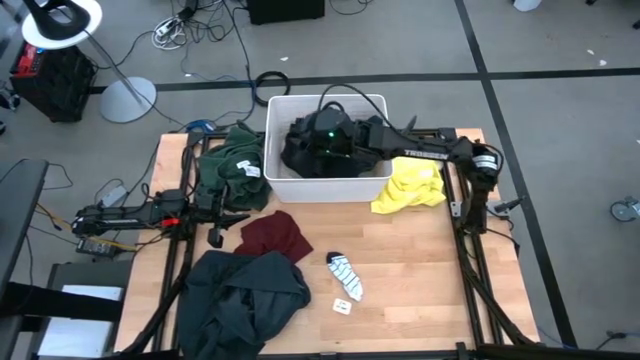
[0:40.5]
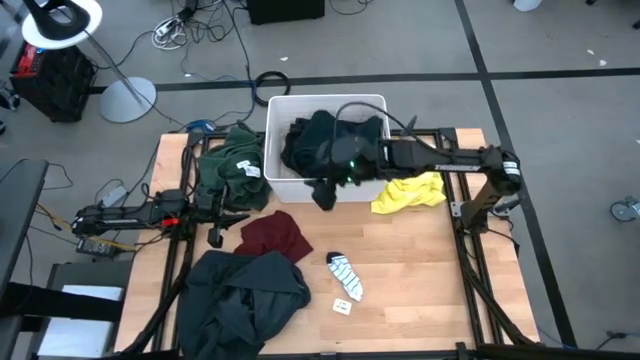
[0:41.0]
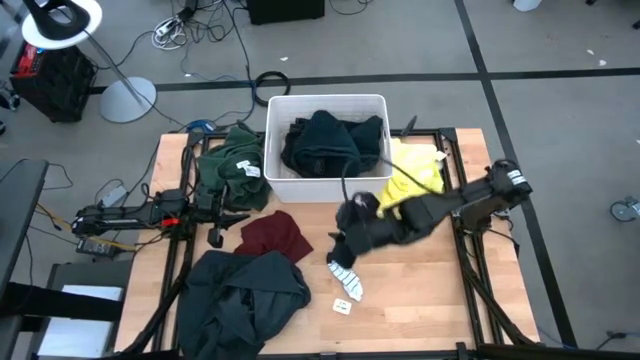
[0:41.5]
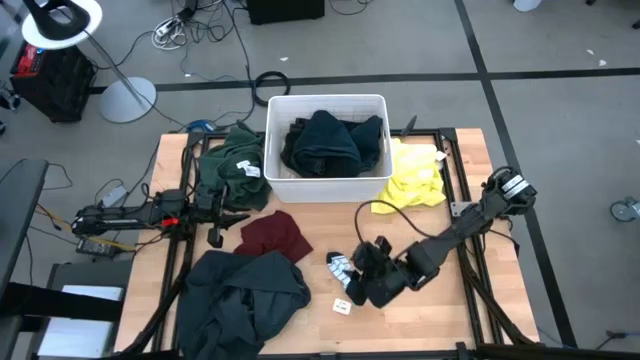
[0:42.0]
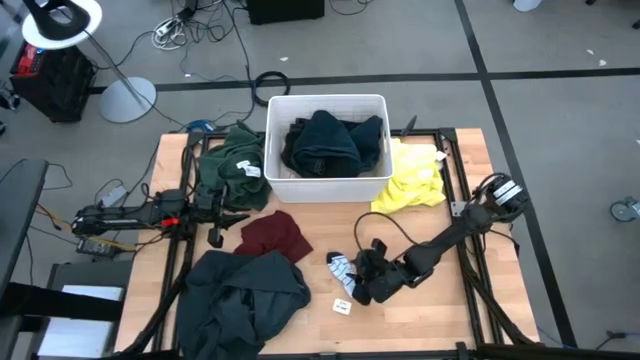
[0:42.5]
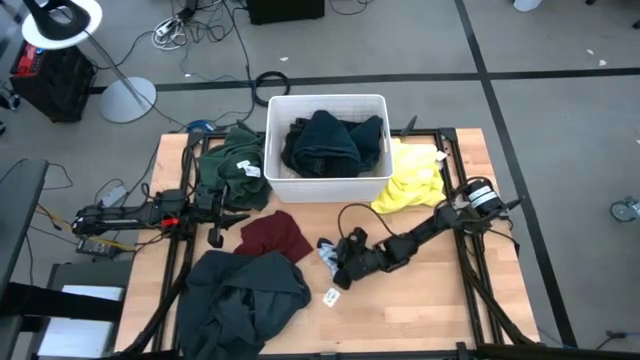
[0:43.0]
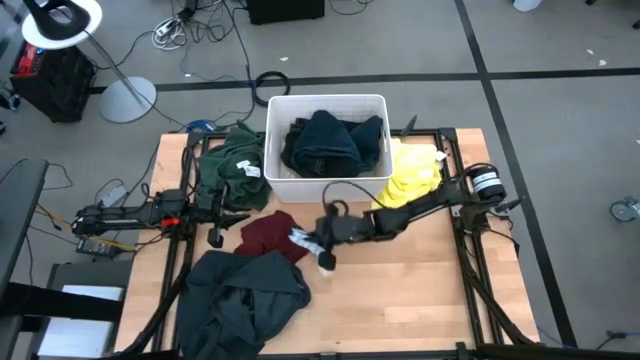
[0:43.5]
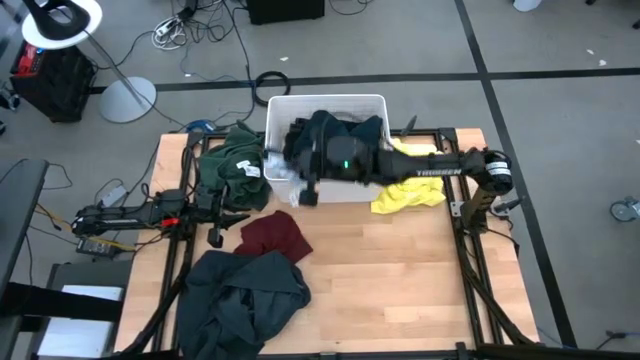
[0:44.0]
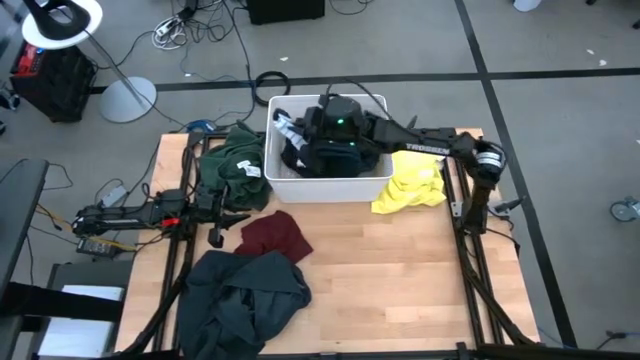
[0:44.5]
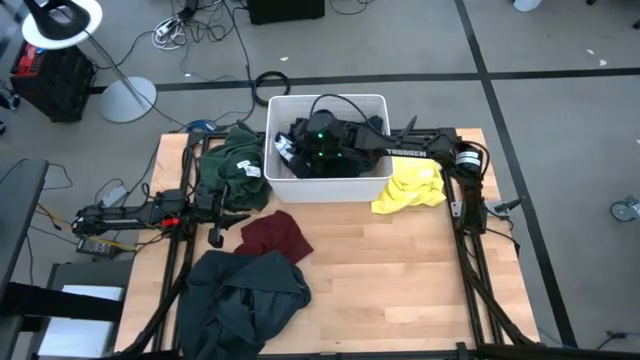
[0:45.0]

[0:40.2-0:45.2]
Task: Sort clothes
Put the white sock into the white bin

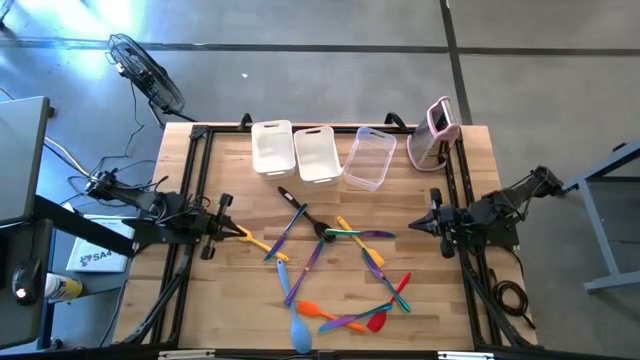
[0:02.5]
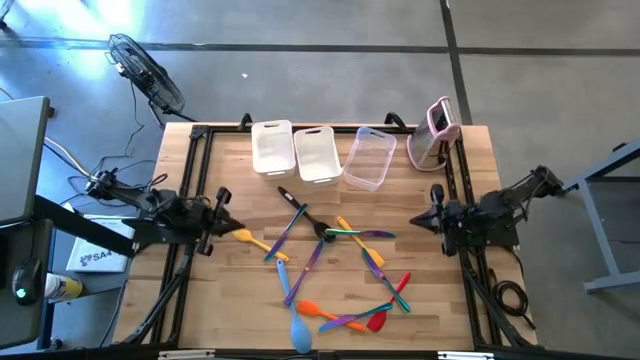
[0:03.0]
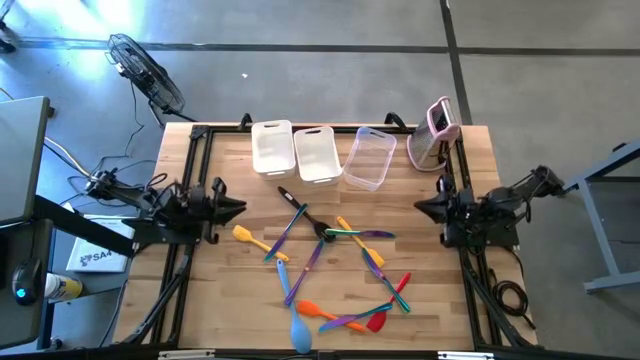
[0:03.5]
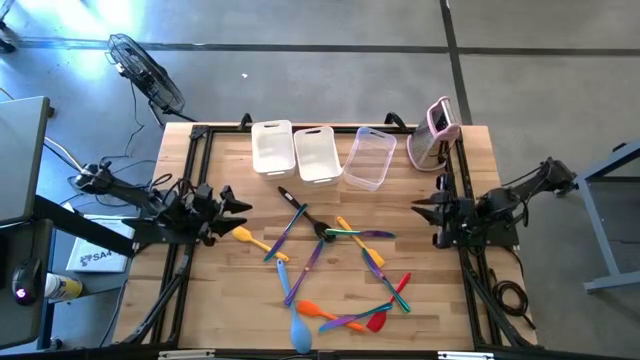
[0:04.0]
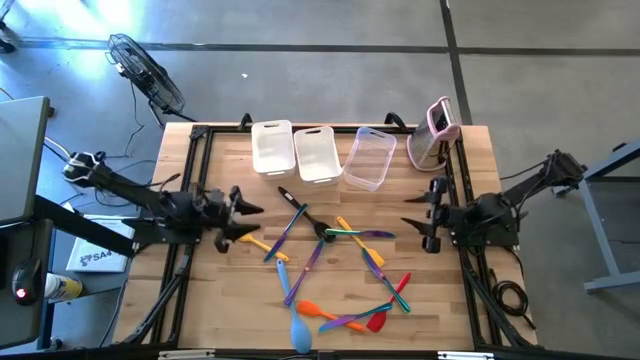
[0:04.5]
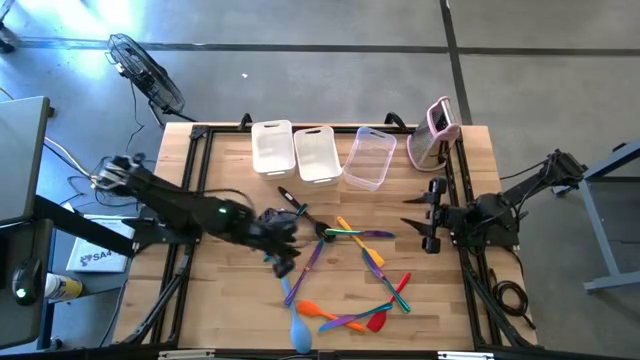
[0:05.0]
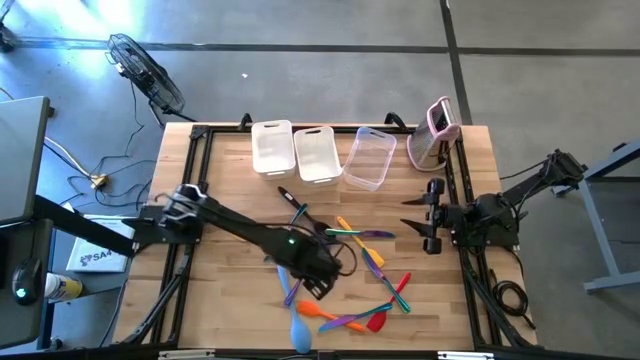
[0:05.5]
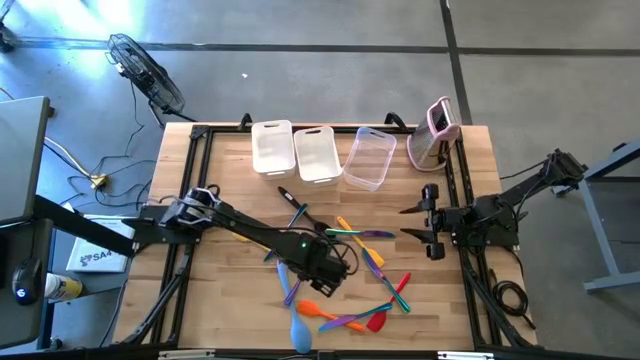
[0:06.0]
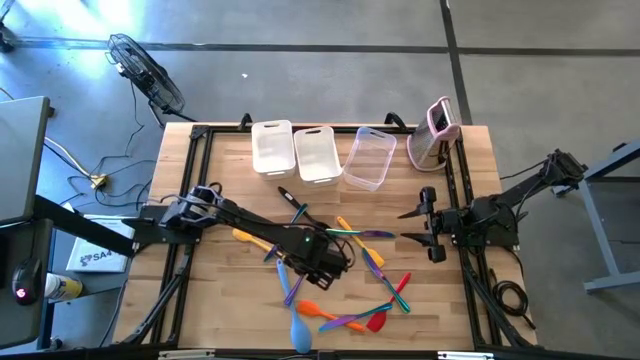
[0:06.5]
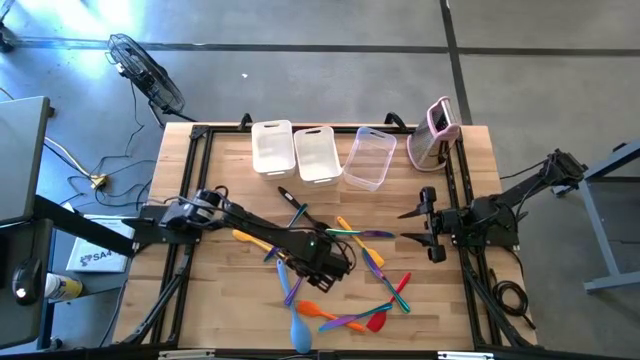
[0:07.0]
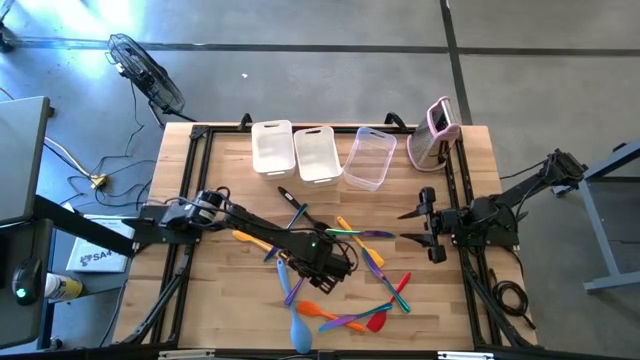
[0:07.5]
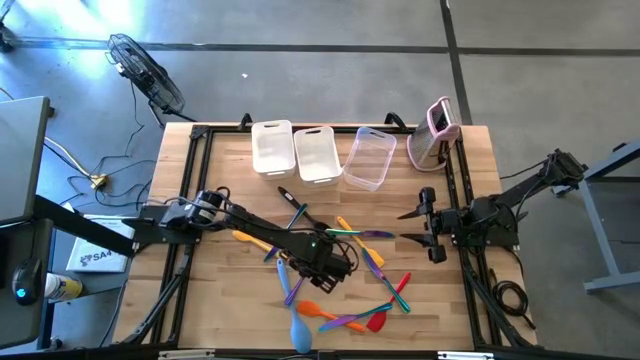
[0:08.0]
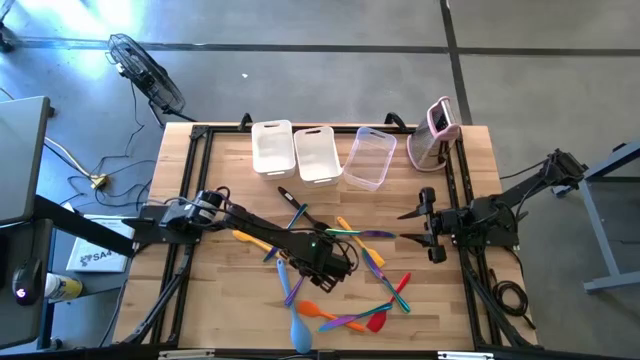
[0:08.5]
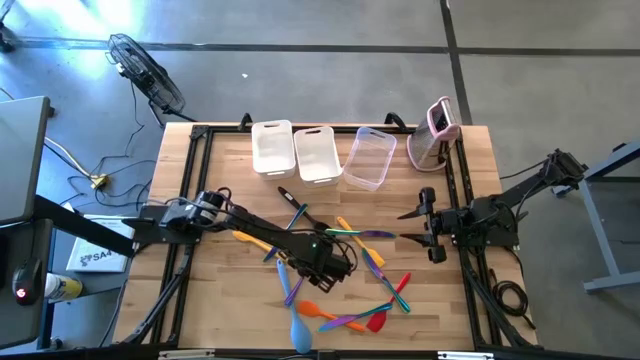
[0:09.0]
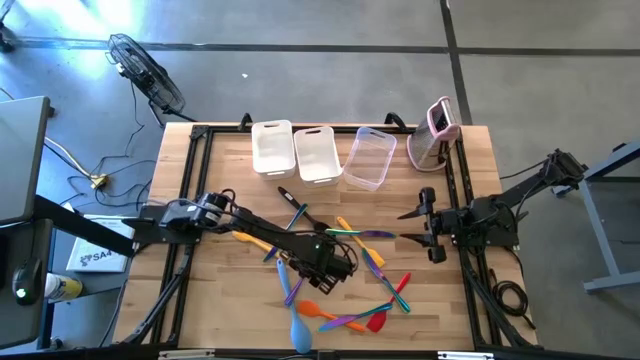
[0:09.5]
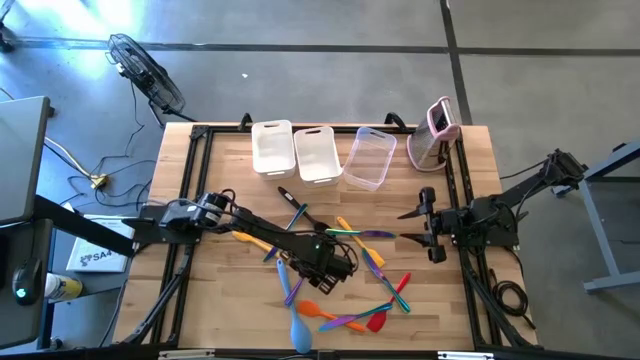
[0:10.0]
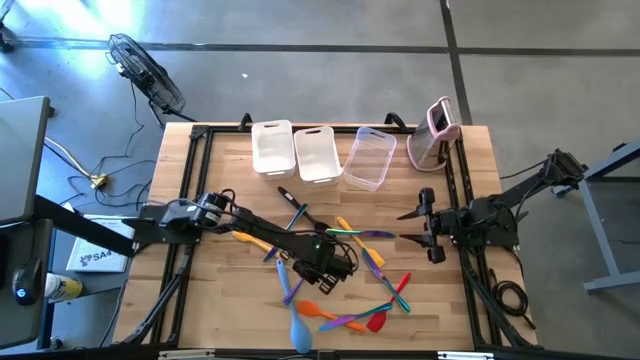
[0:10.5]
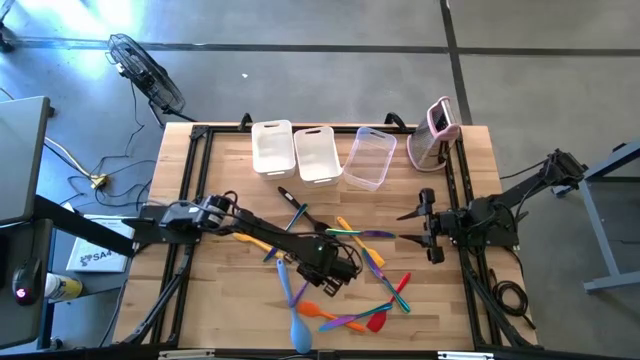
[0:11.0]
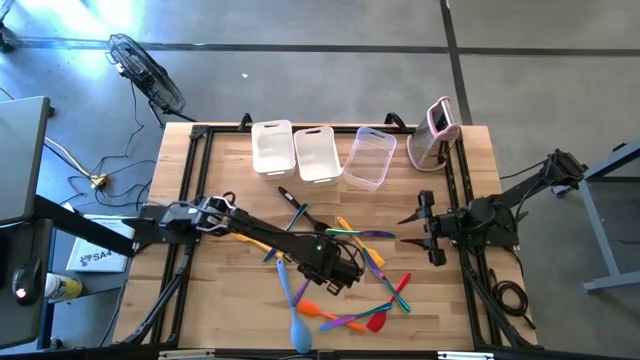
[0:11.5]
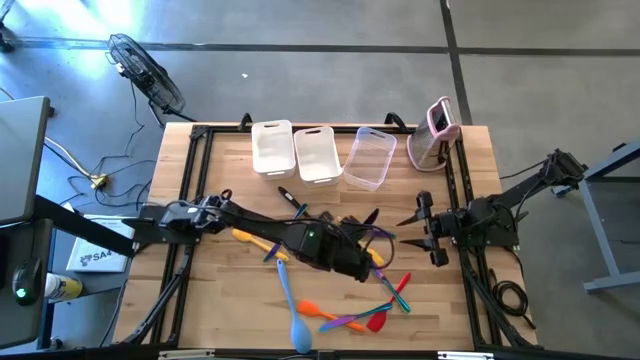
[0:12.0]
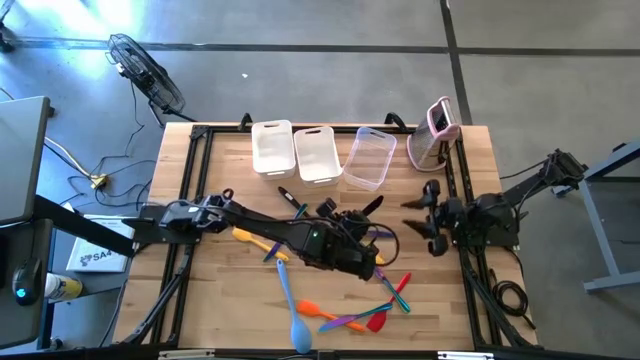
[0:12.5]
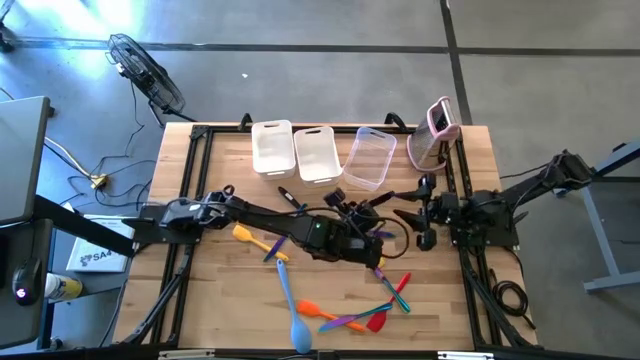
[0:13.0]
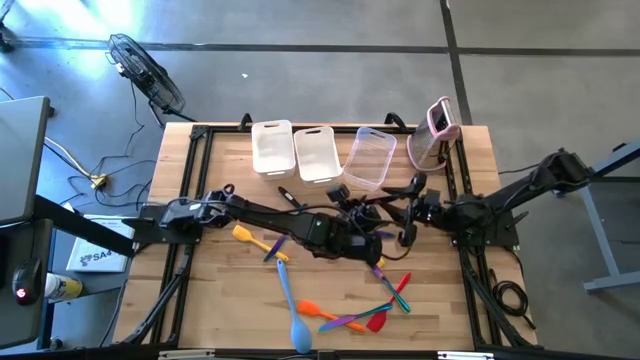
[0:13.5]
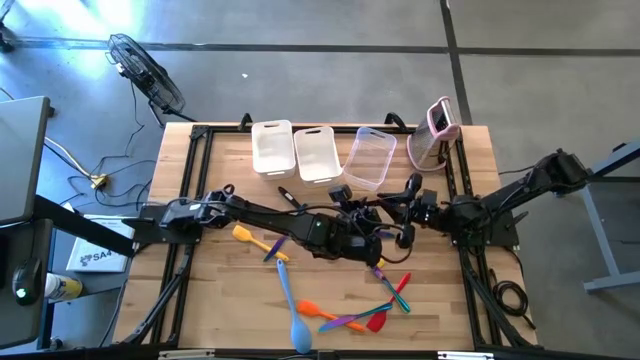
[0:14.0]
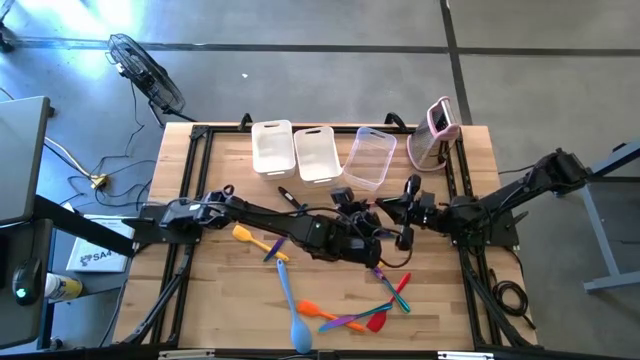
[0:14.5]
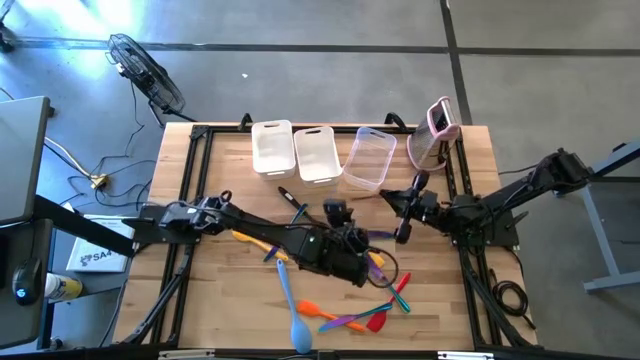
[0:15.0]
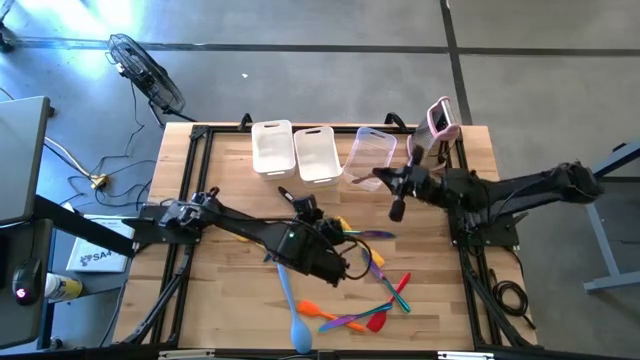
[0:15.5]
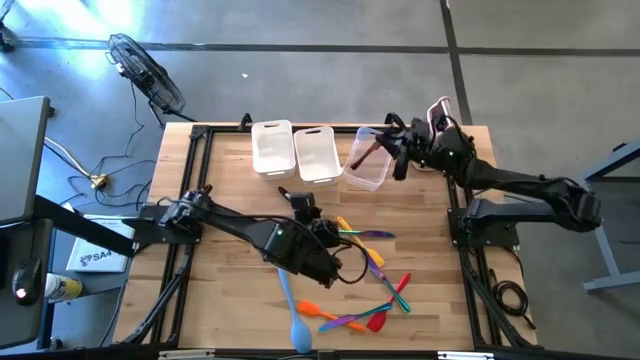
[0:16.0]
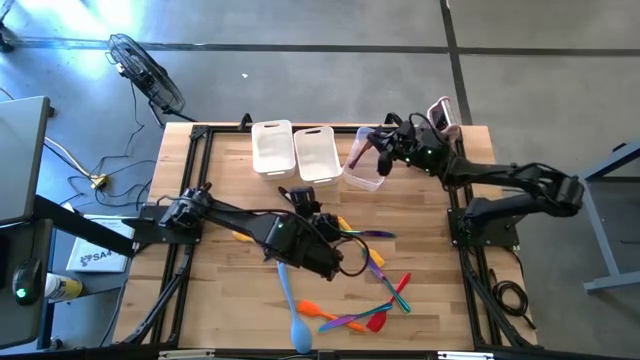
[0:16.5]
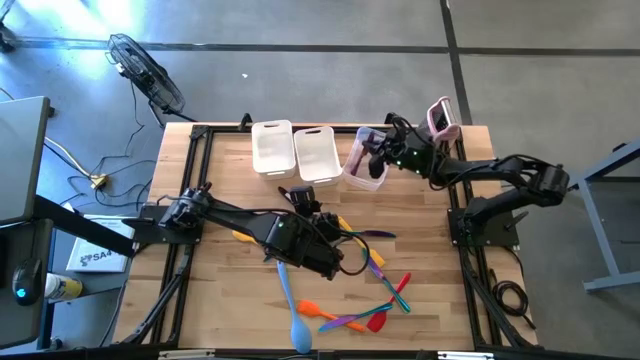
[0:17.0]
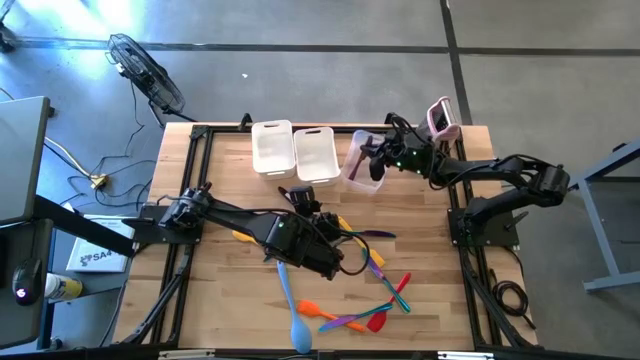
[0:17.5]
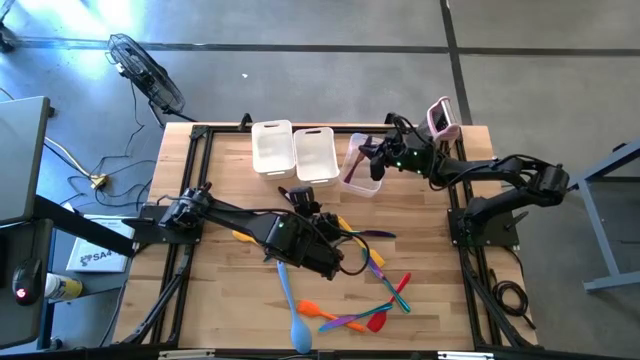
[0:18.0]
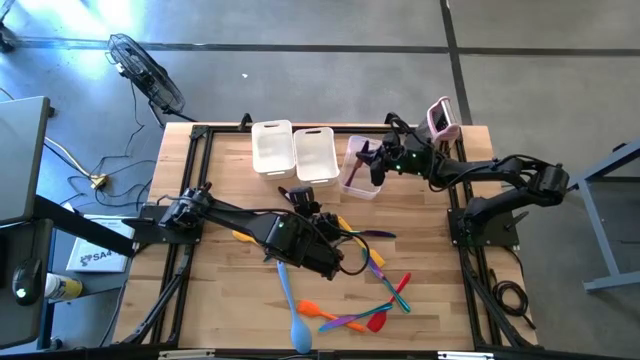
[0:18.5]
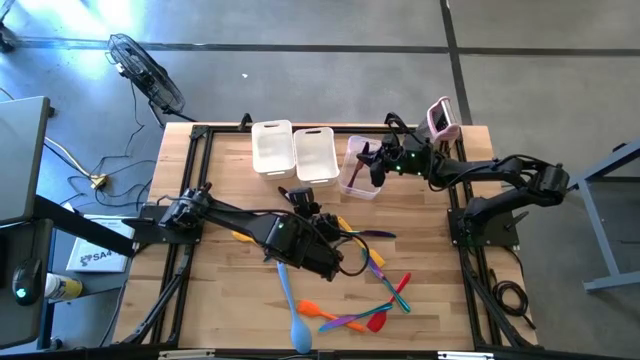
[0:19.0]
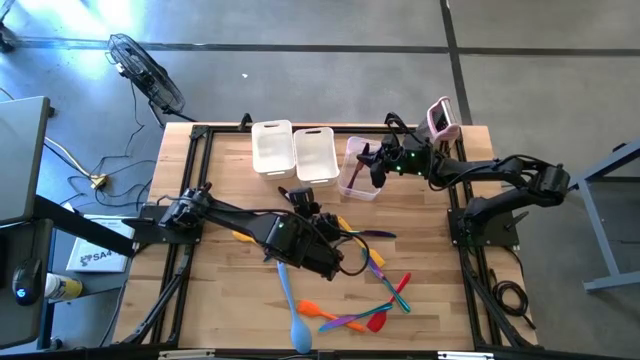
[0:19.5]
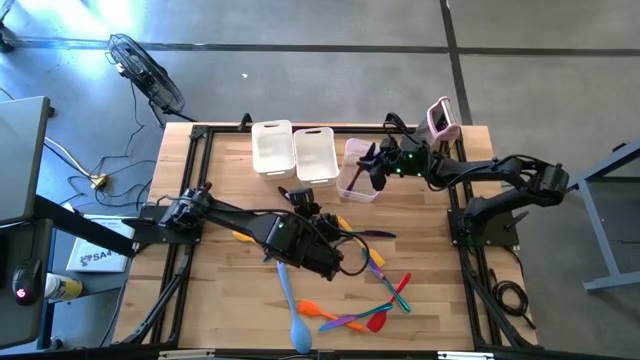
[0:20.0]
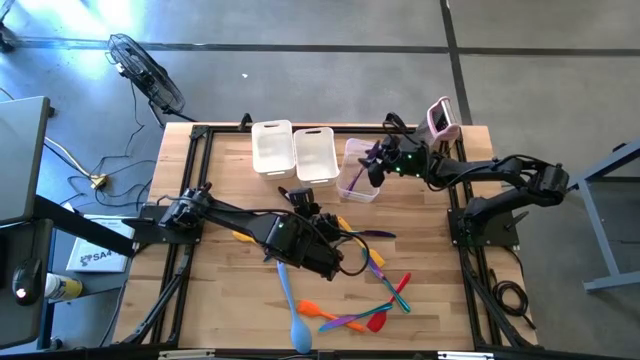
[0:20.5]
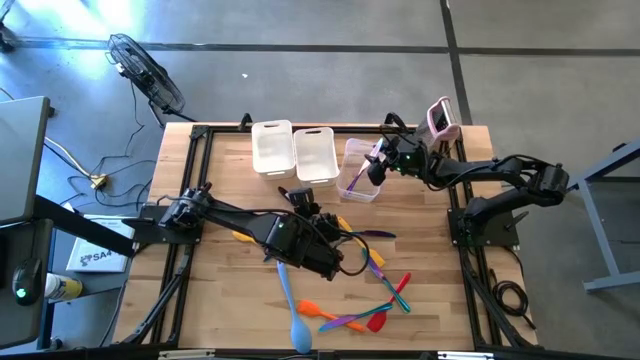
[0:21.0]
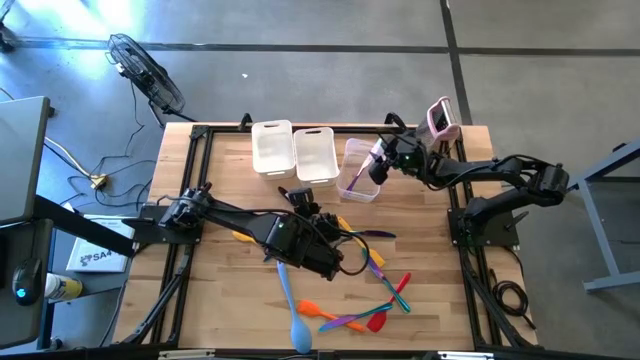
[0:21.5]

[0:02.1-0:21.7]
Task: Pick & Place Kitchen Items
Put the purple table knife into the transparent bin
